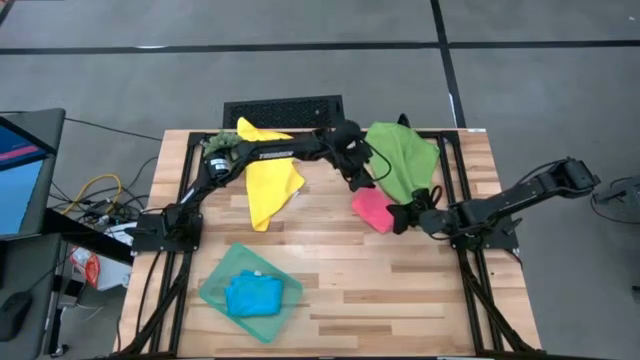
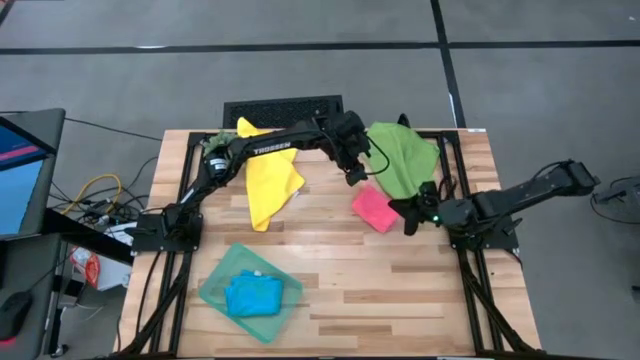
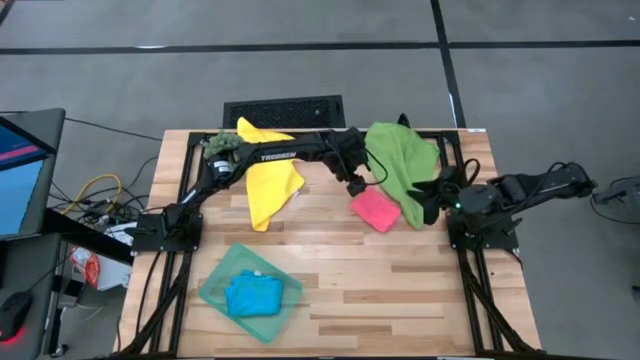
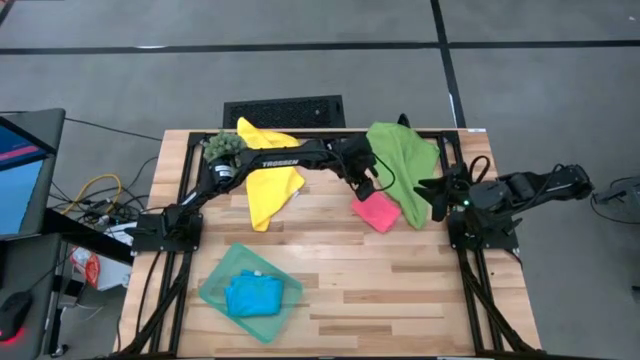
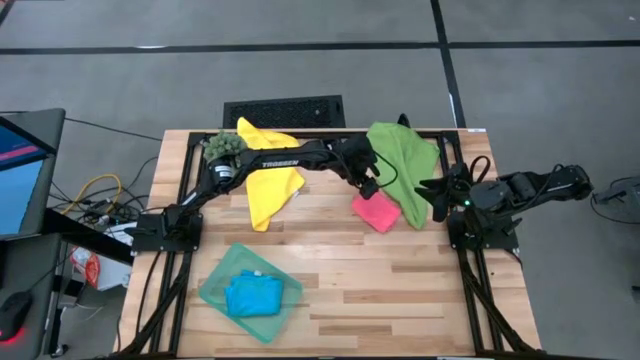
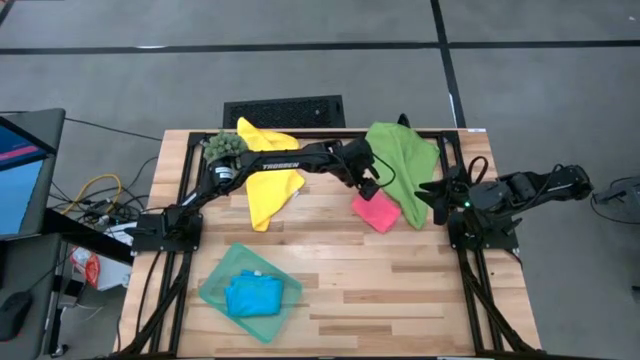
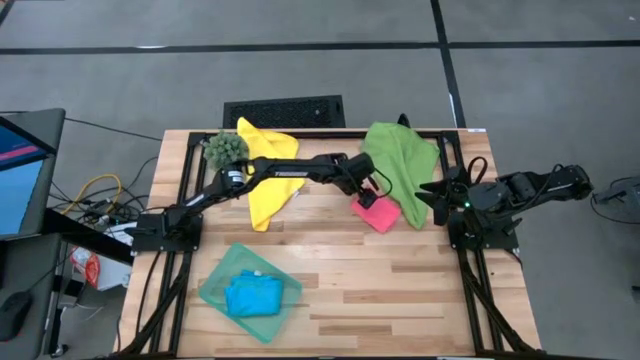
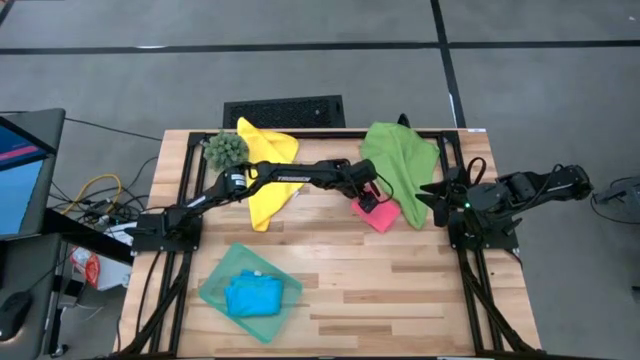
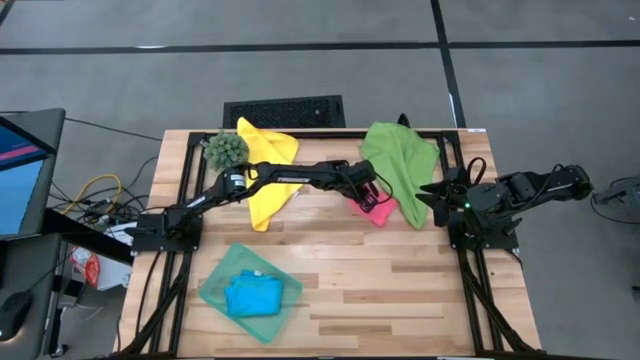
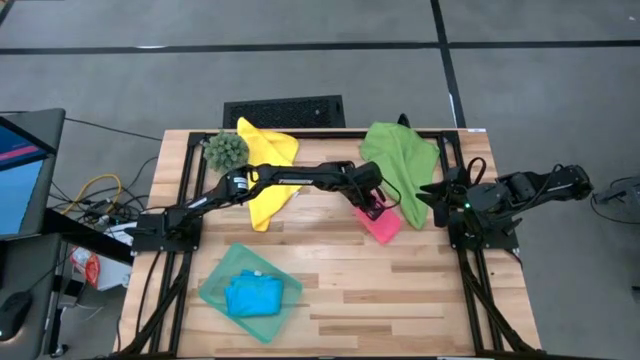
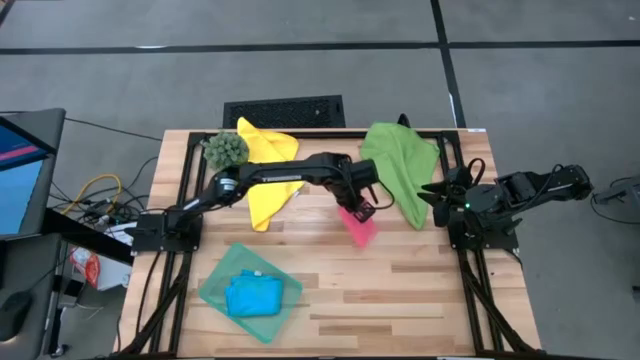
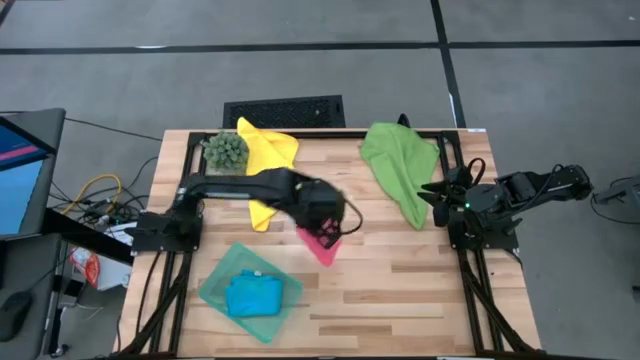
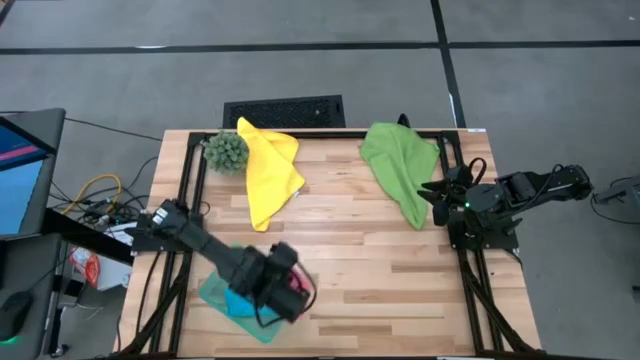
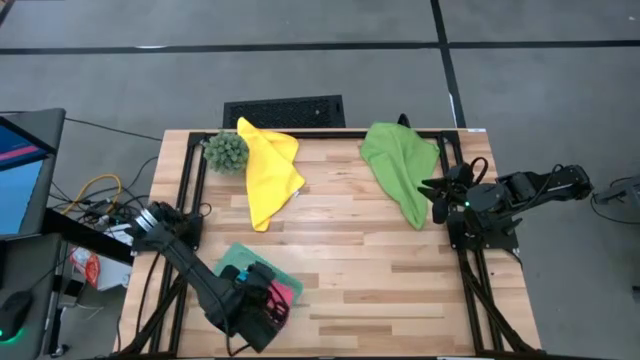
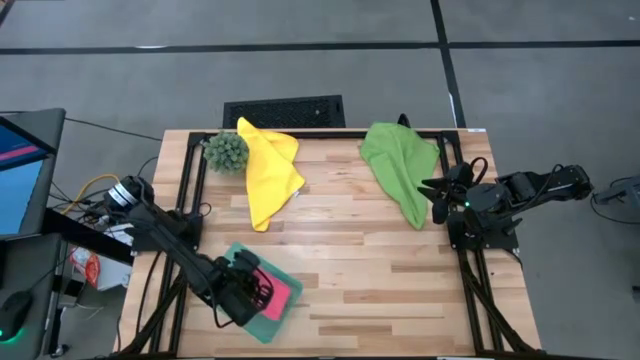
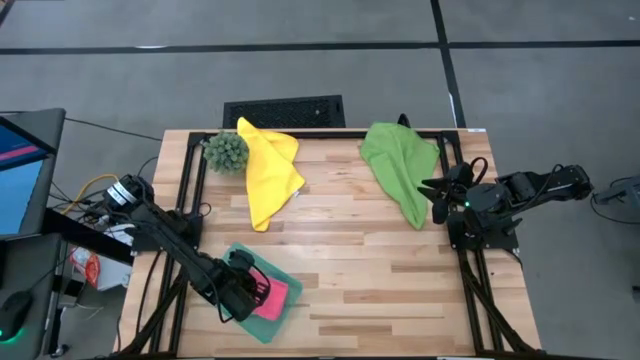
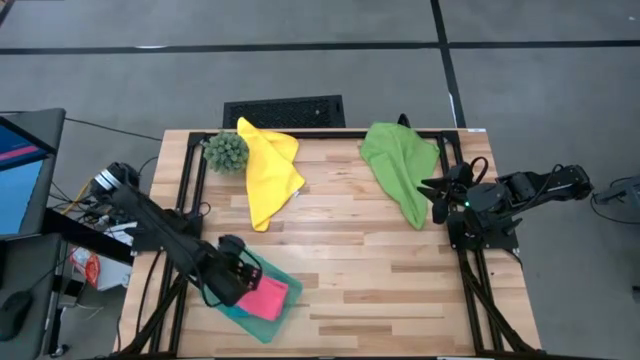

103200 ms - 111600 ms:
Task: Fold microfiber towels
Put the folded pink microfiber towel into the bin

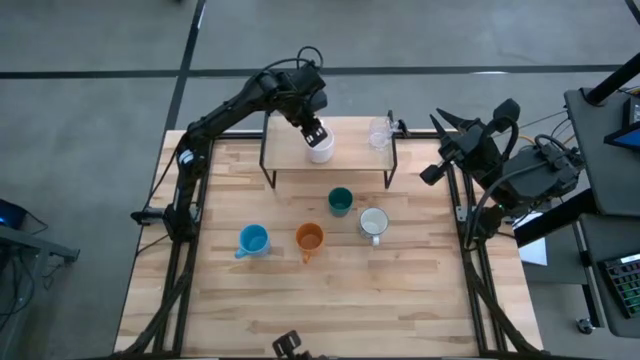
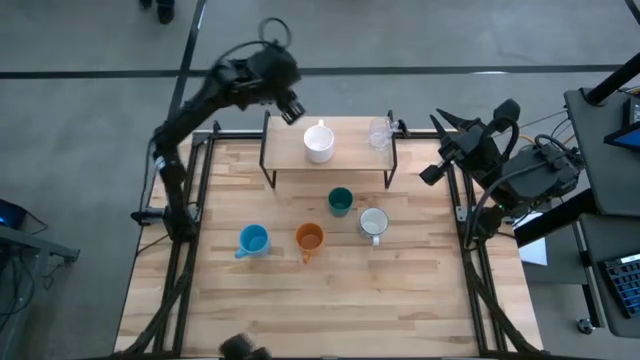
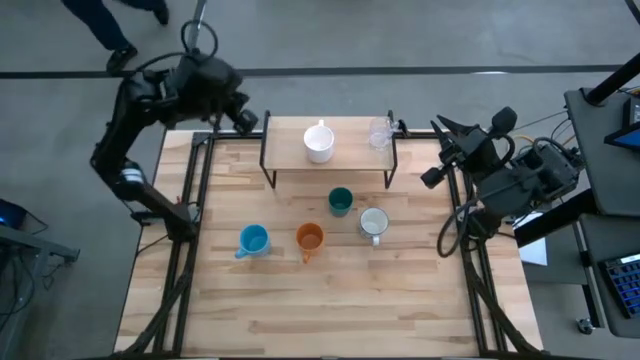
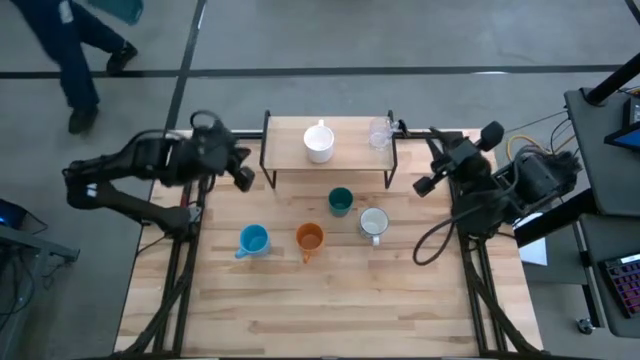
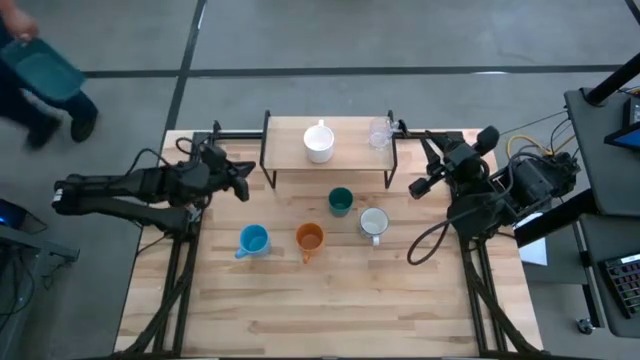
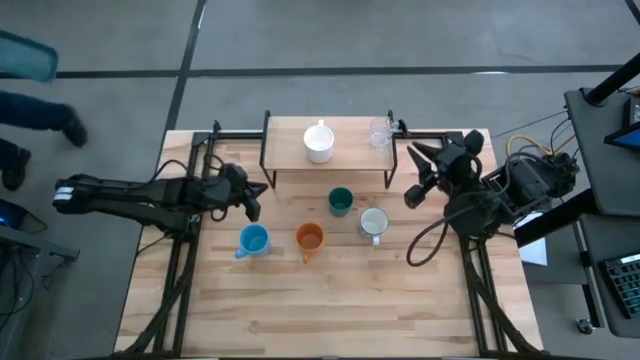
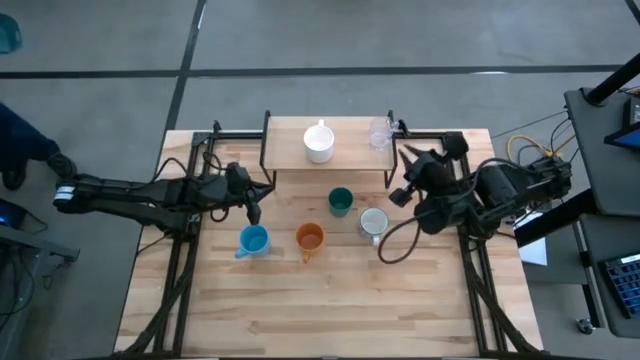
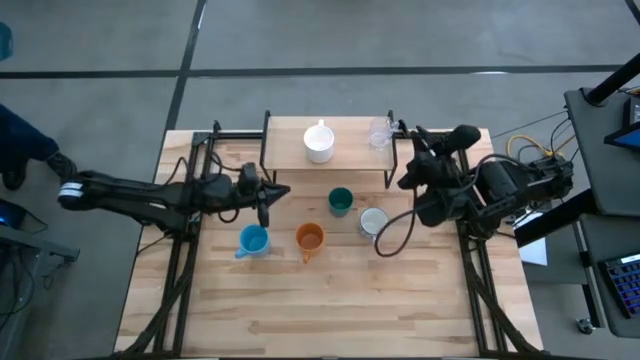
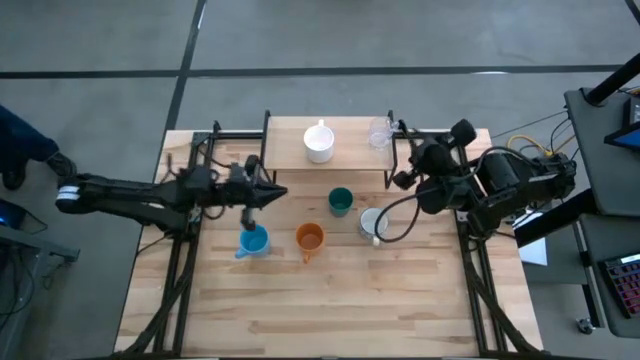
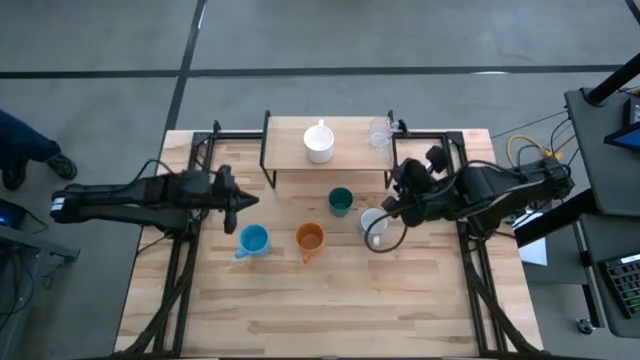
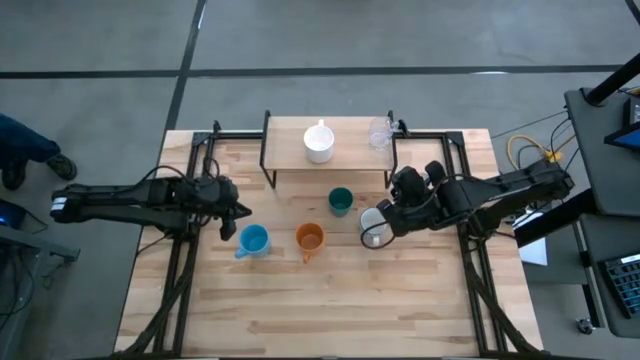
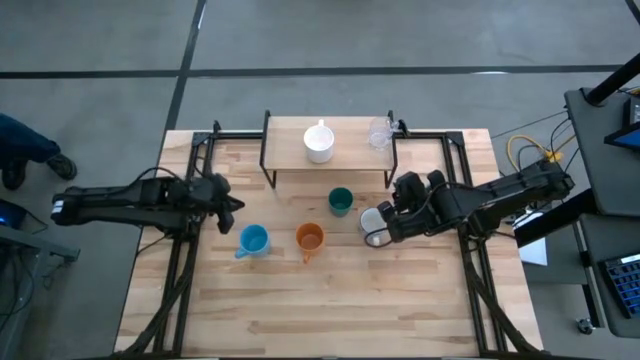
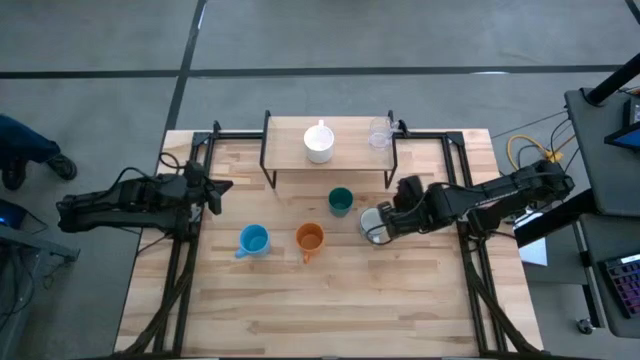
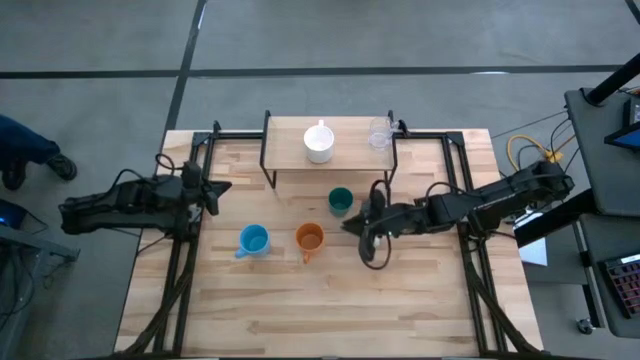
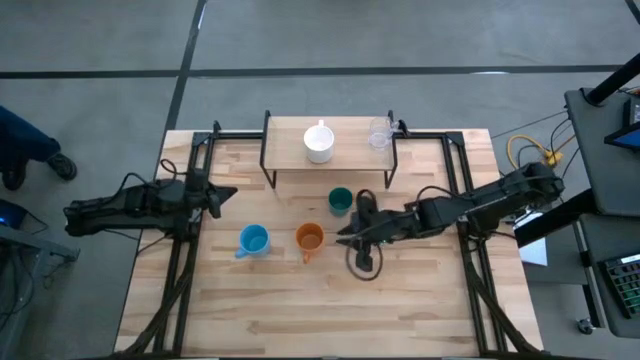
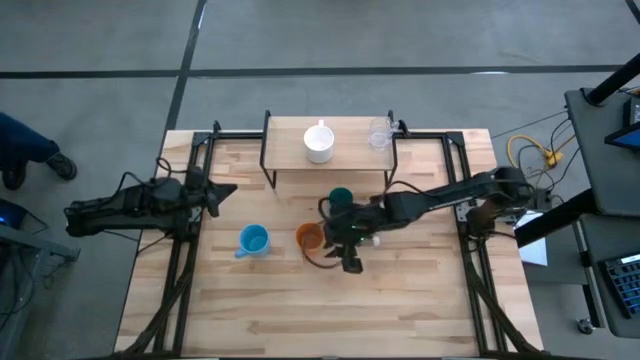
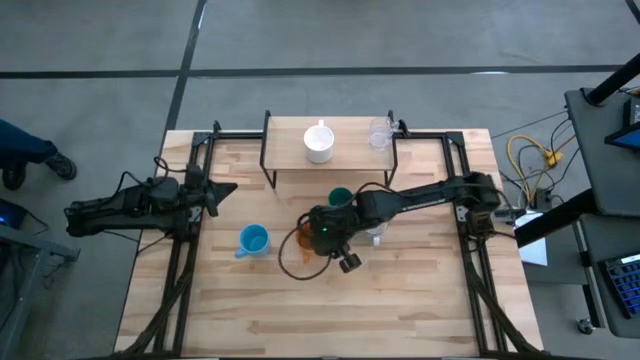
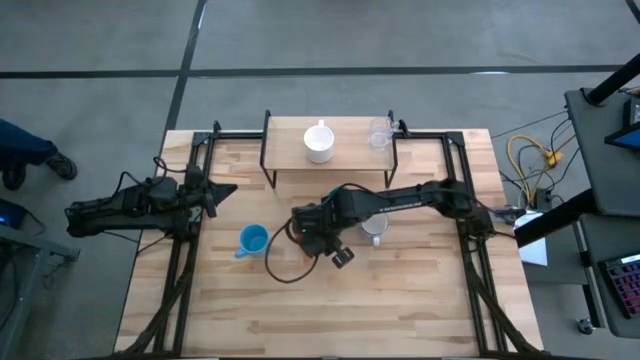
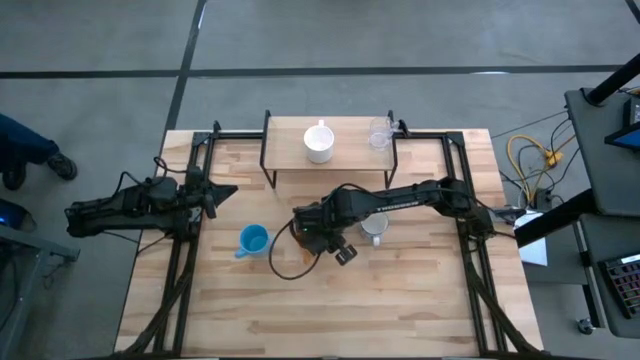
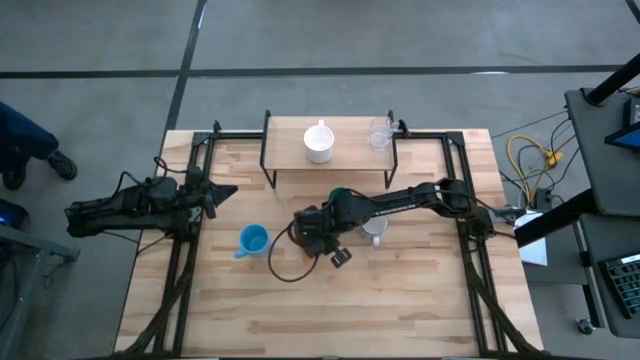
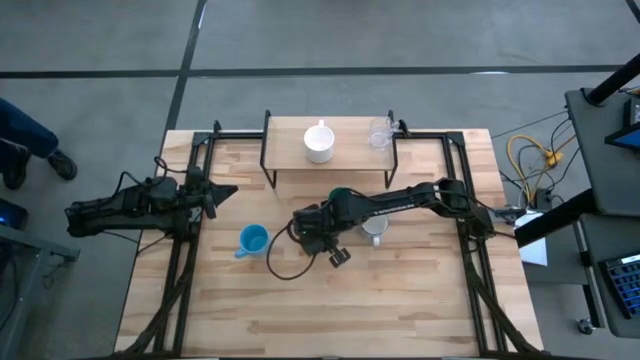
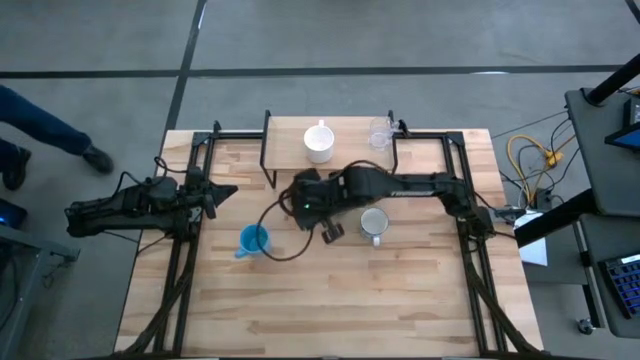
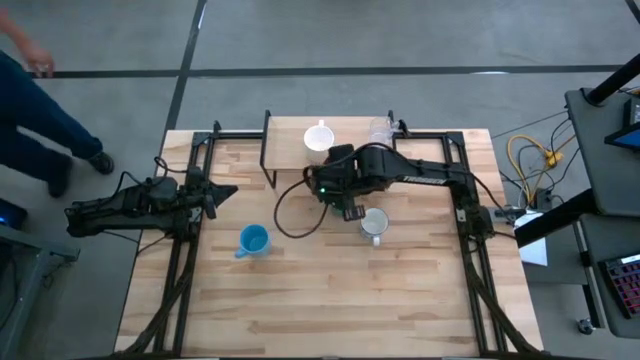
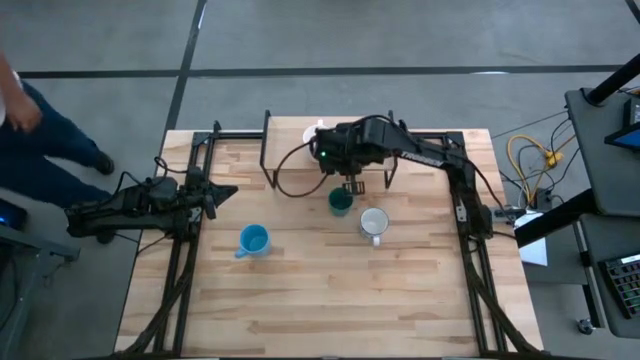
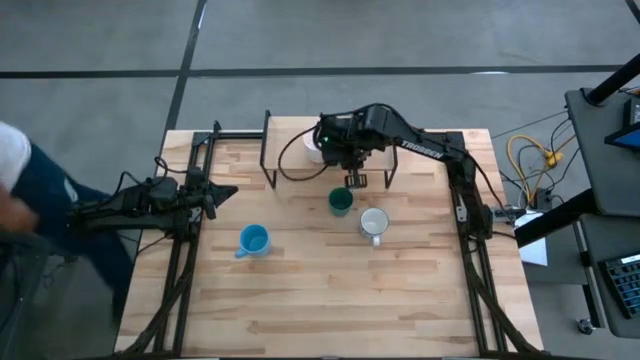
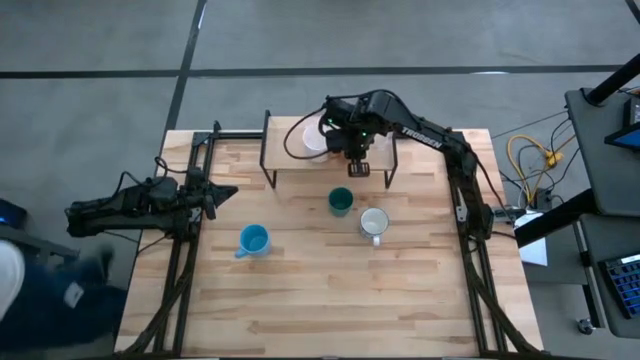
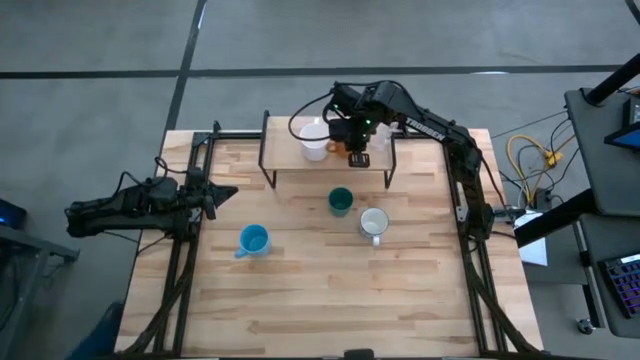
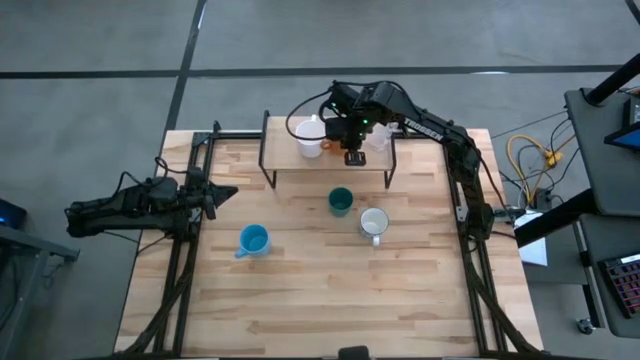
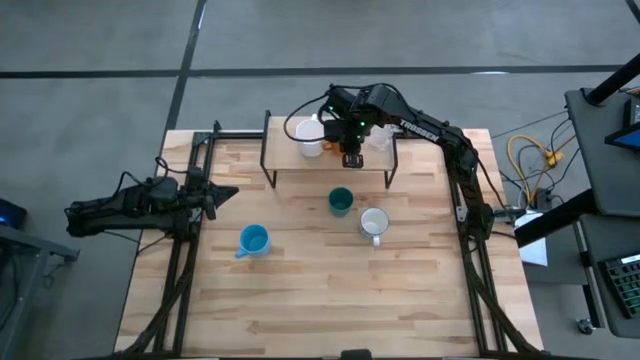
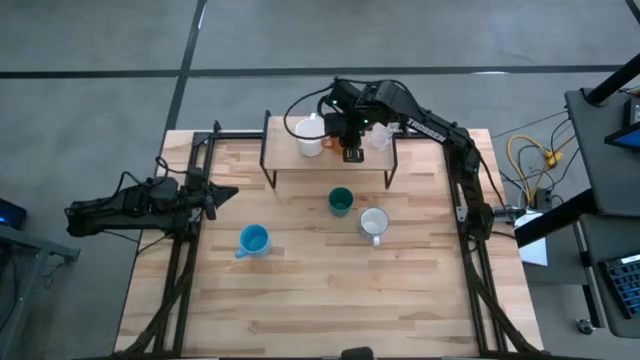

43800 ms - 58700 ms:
Task: Stack small to large cups/mugs on shelf
Put the orange mug on the shelf
